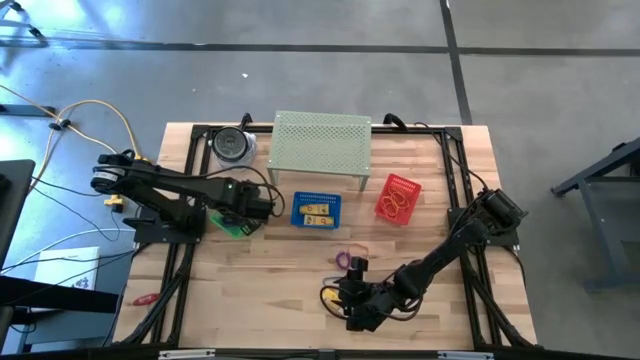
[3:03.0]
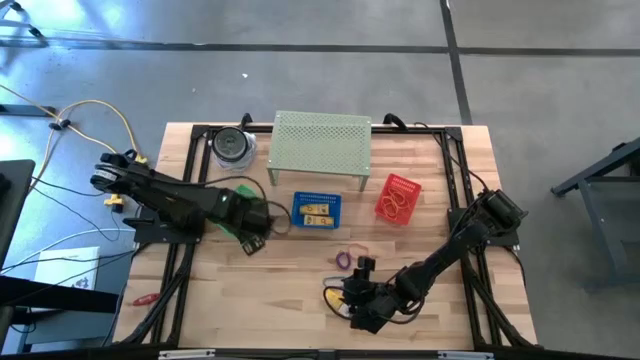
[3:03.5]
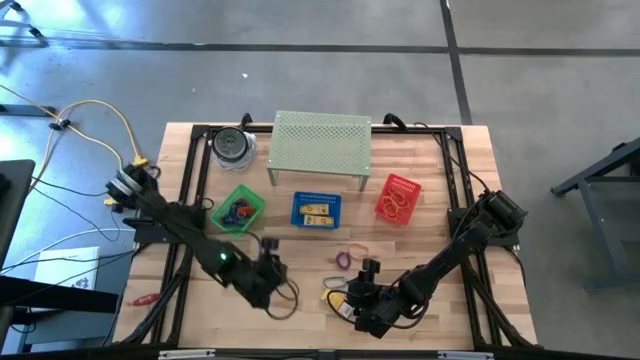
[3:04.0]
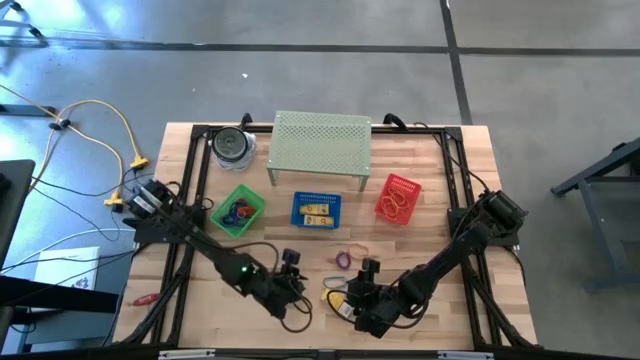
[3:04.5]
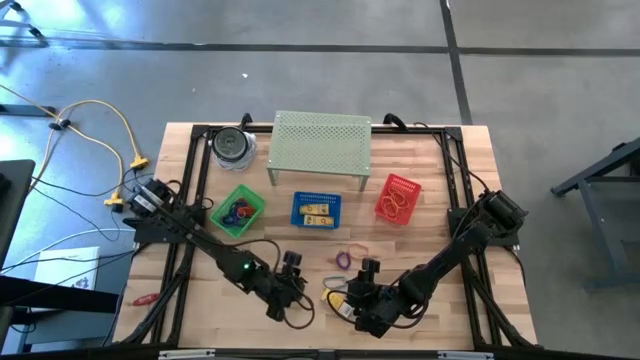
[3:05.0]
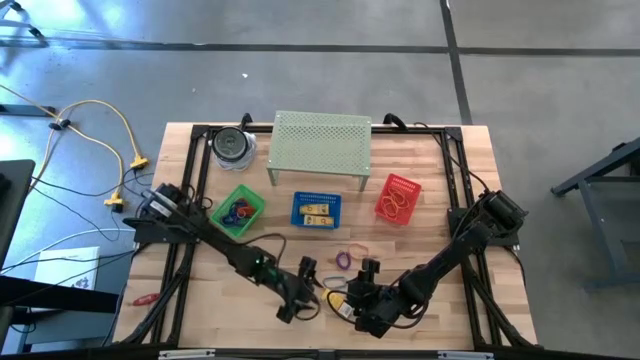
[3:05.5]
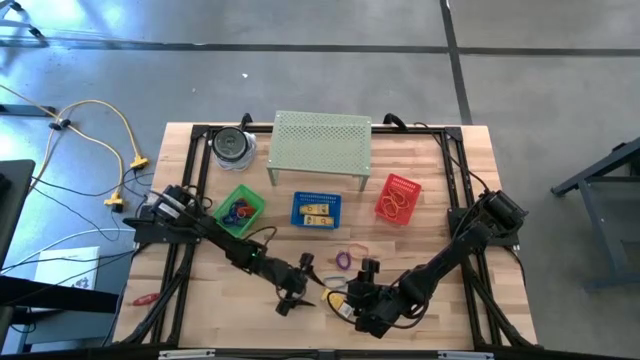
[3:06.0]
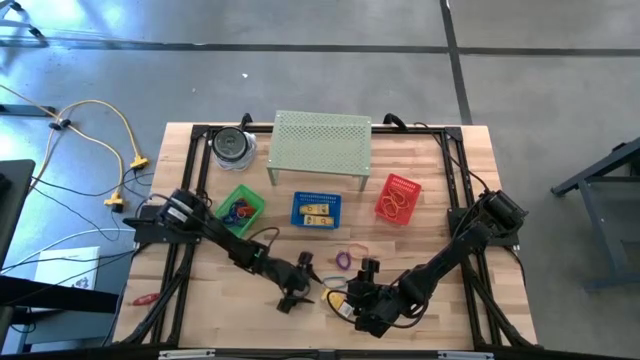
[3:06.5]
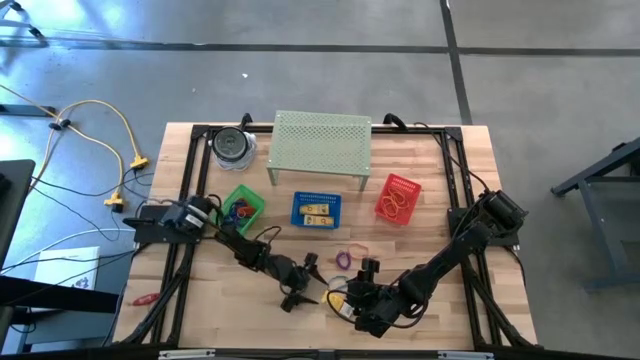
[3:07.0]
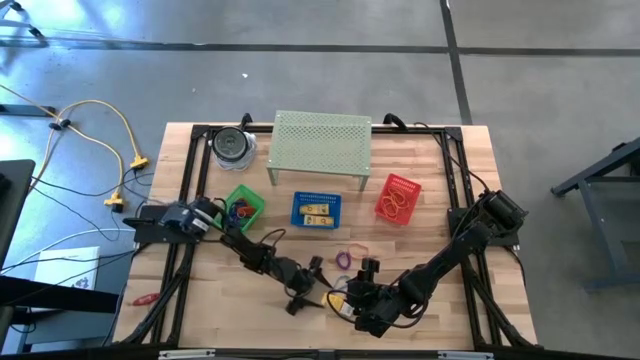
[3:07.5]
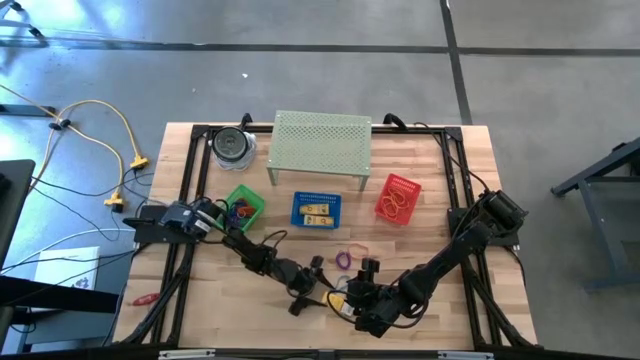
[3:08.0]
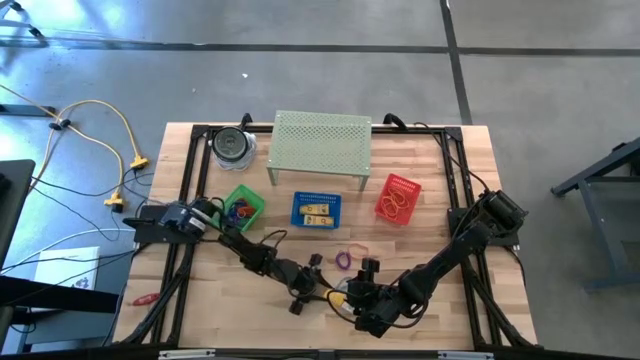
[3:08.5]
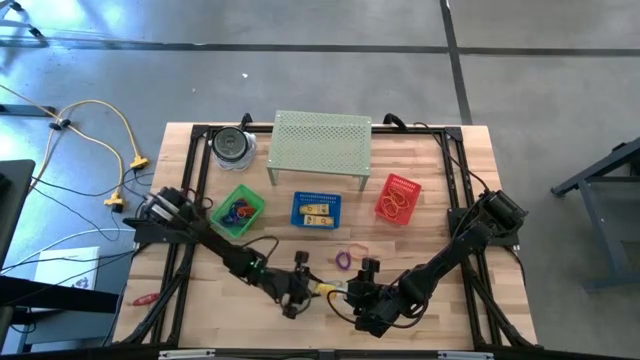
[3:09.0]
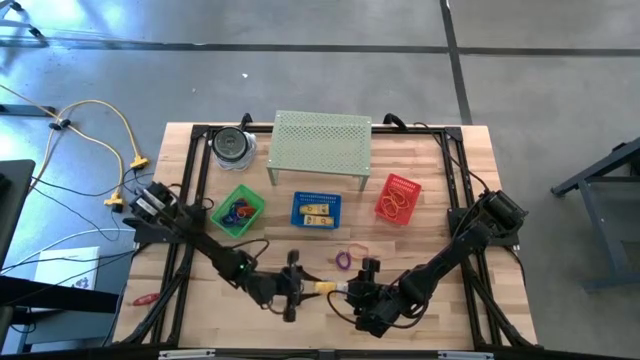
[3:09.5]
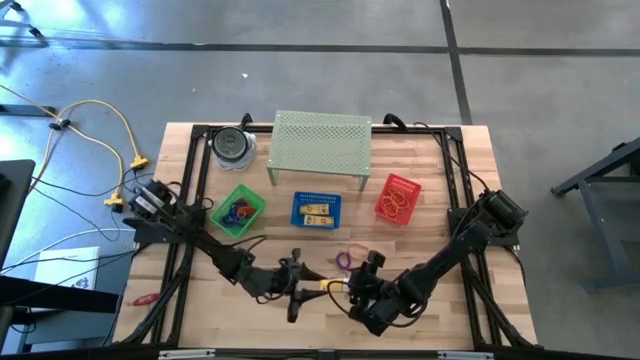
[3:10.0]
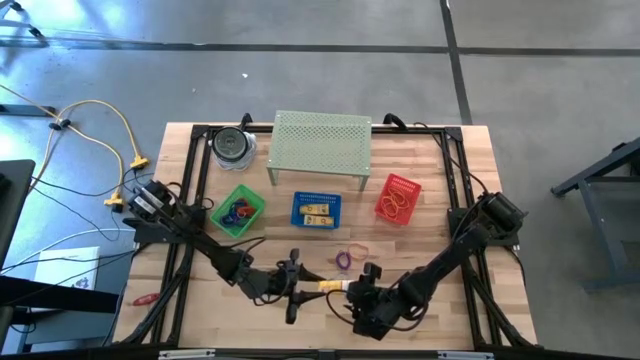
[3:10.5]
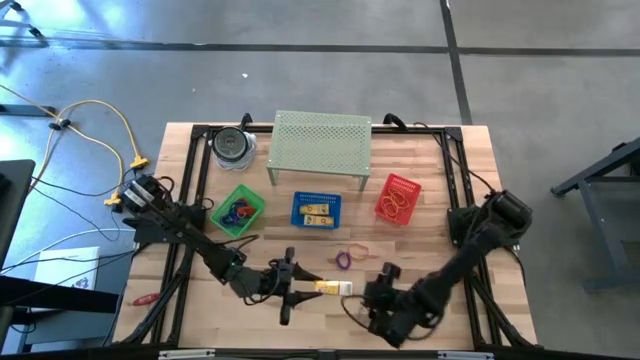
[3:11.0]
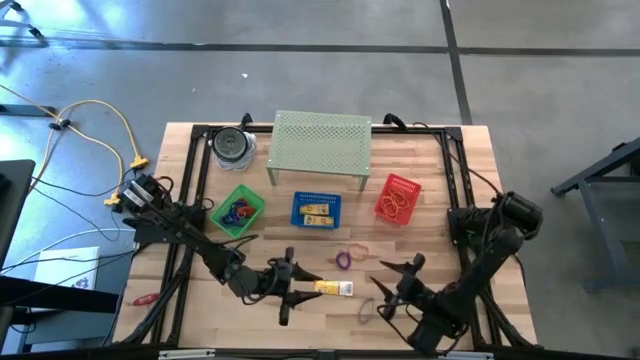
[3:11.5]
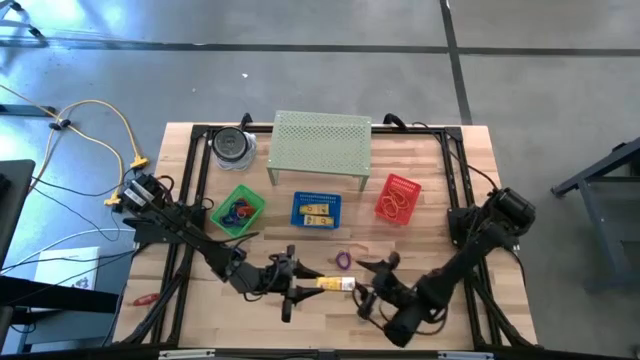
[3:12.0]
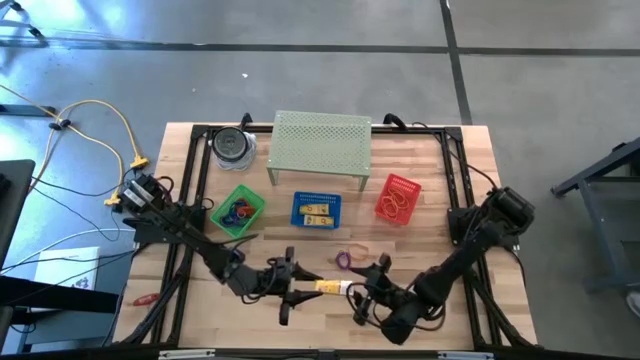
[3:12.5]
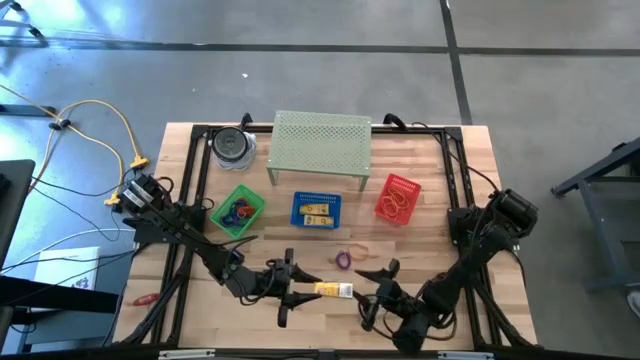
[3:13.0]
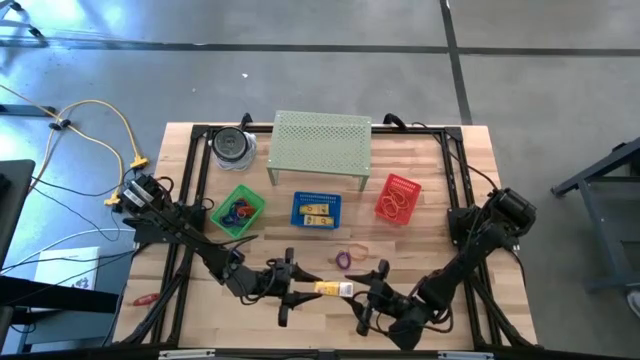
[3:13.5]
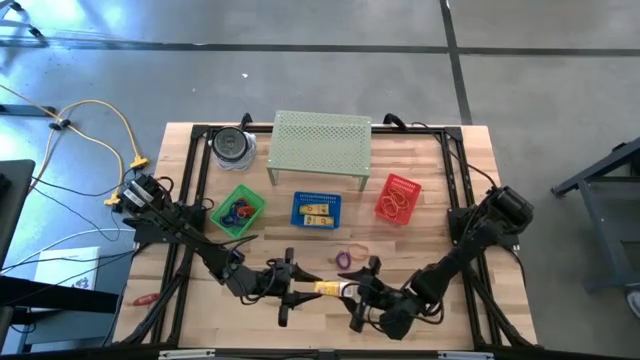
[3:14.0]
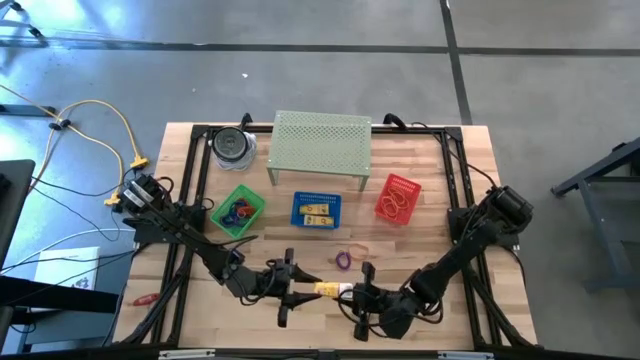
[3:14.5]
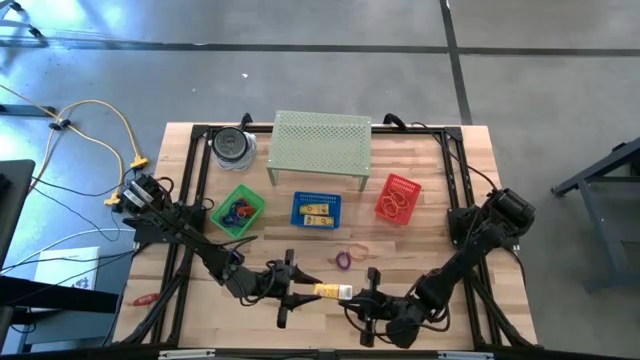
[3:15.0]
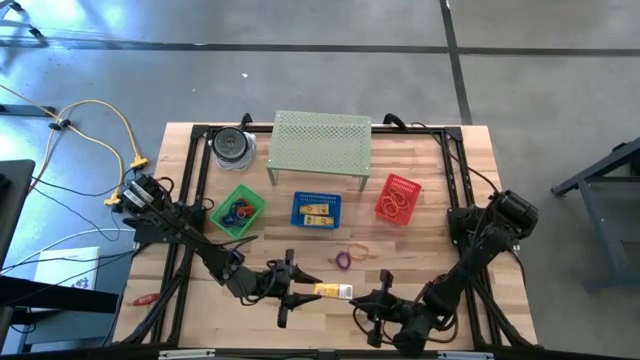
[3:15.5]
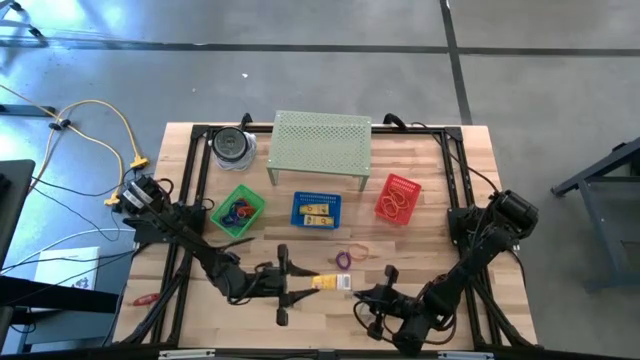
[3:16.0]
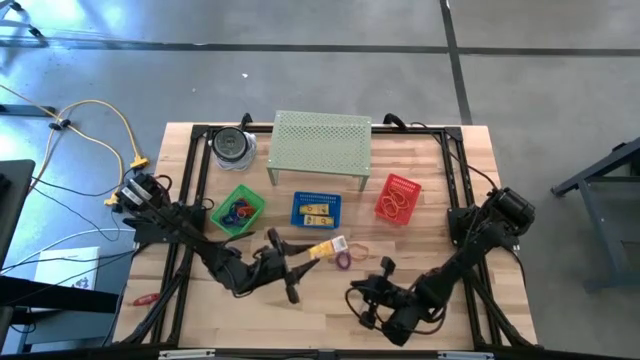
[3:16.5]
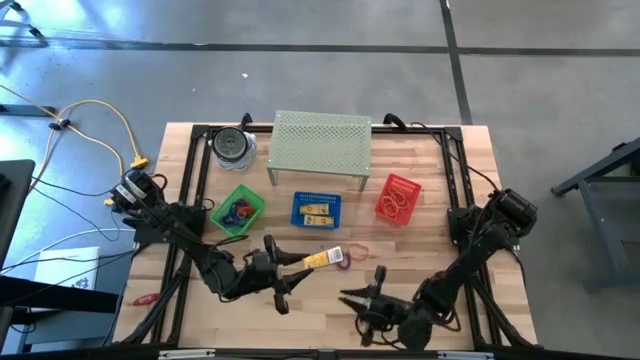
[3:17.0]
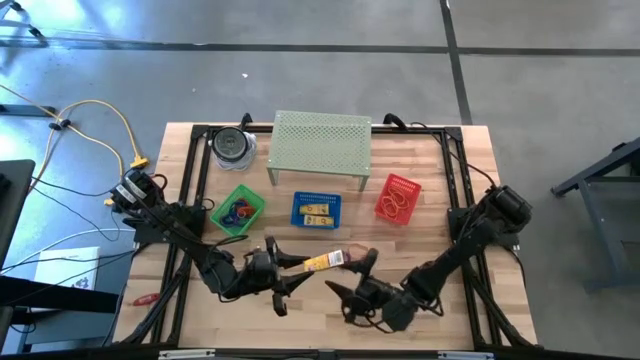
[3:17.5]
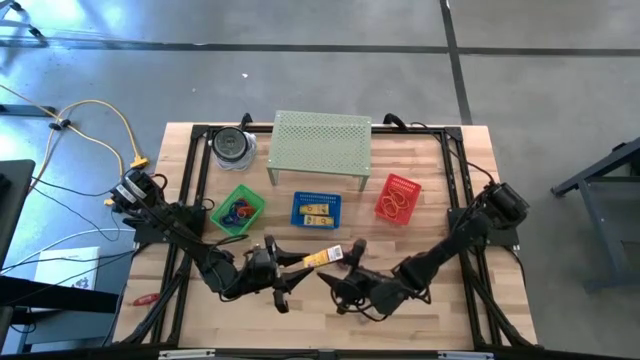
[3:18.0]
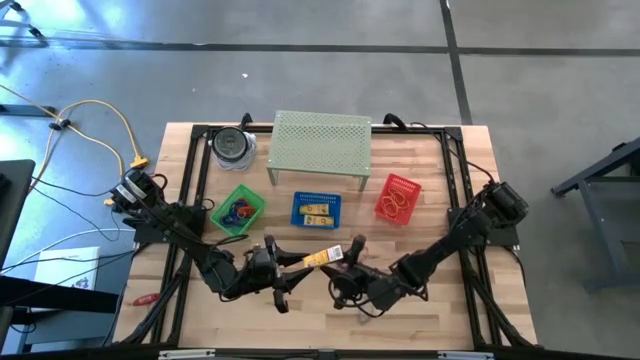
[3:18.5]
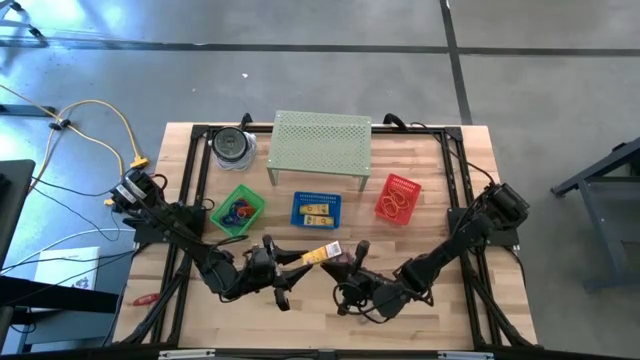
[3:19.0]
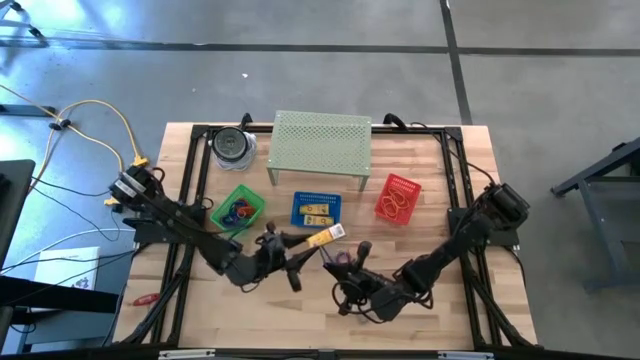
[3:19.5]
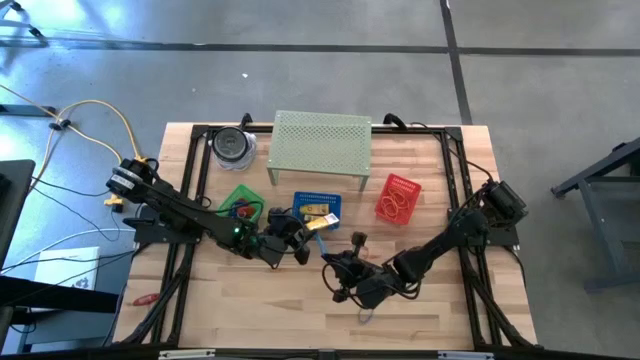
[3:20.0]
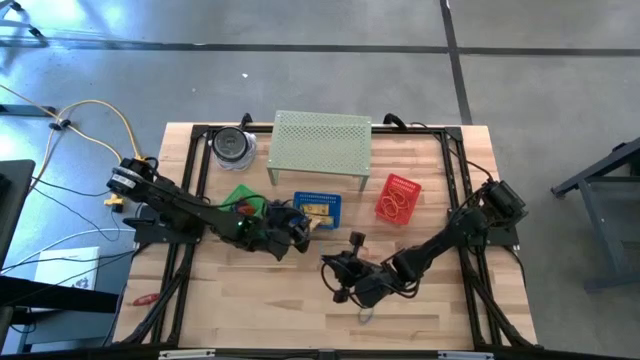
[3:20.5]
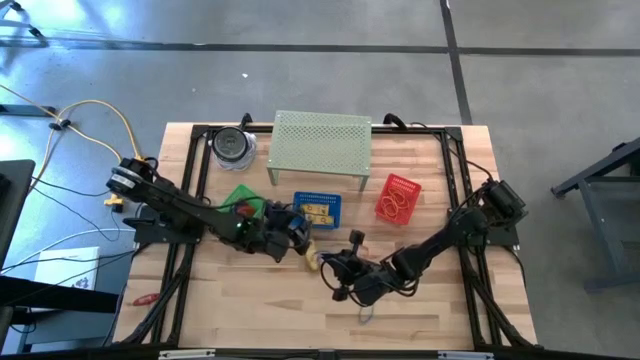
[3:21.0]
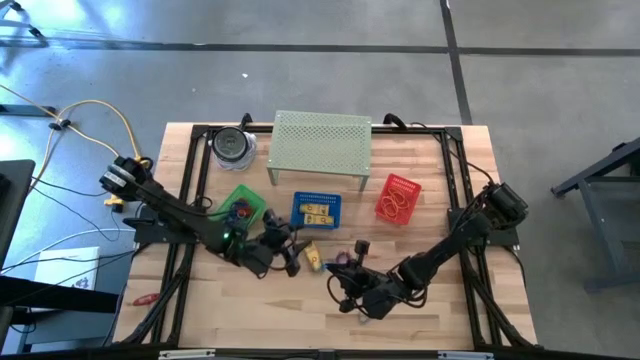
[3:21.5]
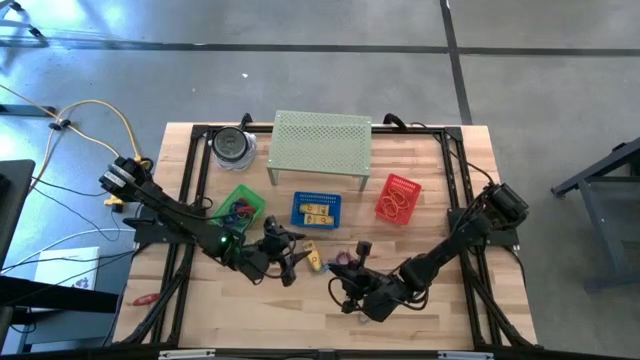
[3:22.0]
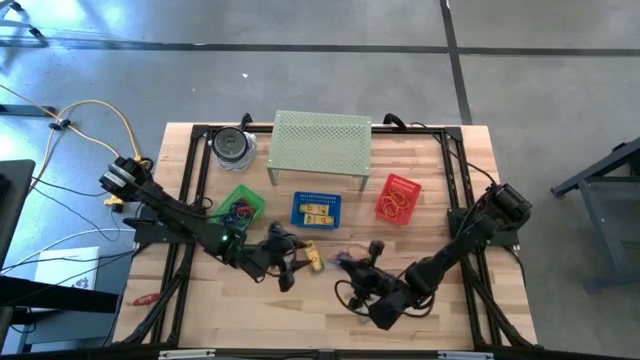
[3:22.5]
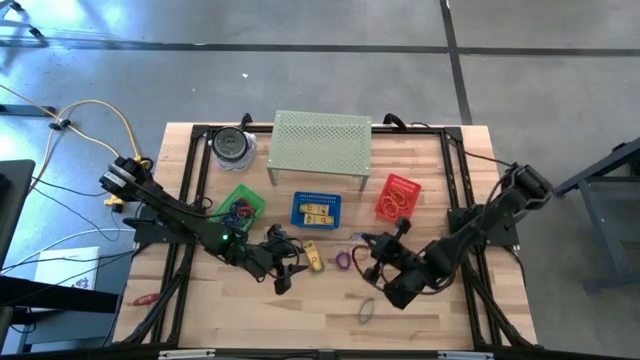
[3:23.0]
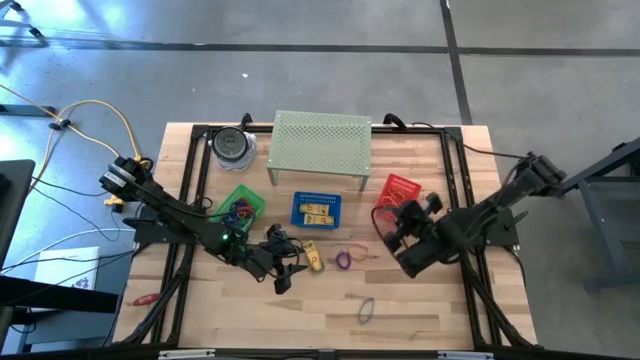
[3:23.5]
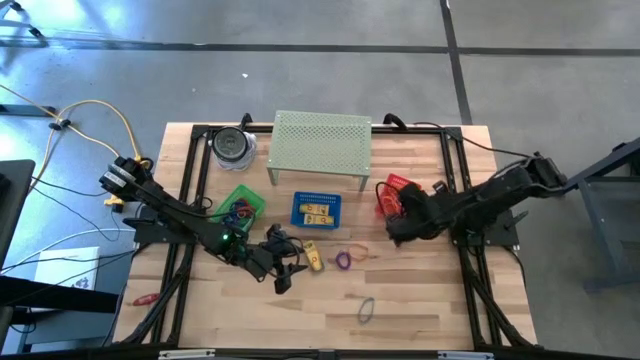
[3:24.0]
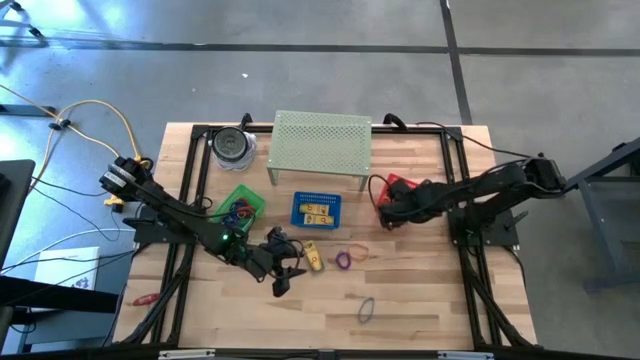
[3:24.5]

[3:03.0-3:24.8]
Task: Pick & Place Office Desk Supplies
Put the blue rubber band into the red bin

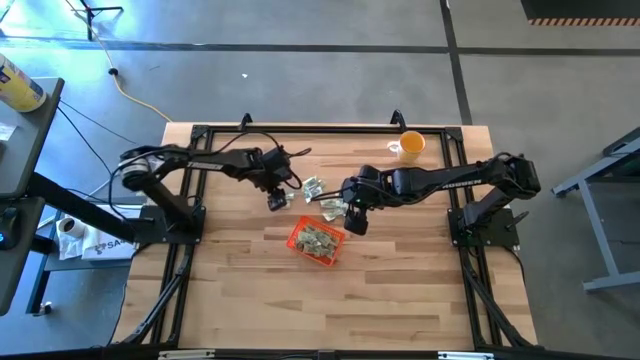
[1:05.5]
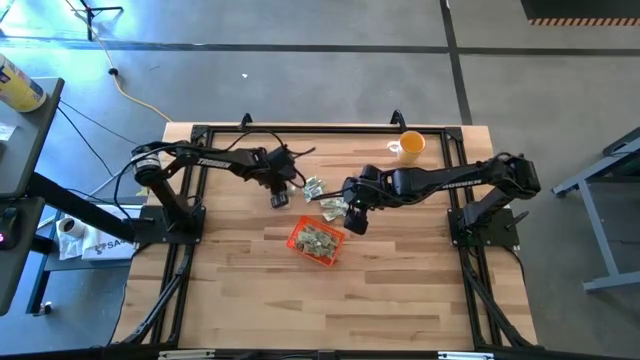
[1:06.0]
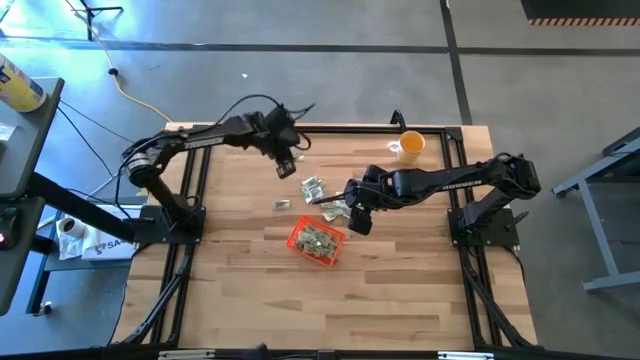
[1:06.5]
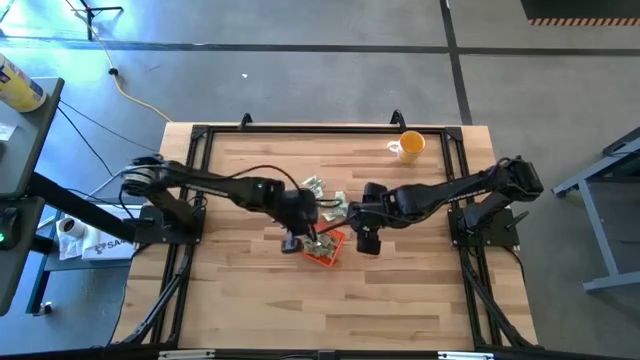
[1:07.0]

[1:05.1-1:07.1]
Task: Pick and place Stevia / Truvia into bins
Put the stevia packet into the orange bin
